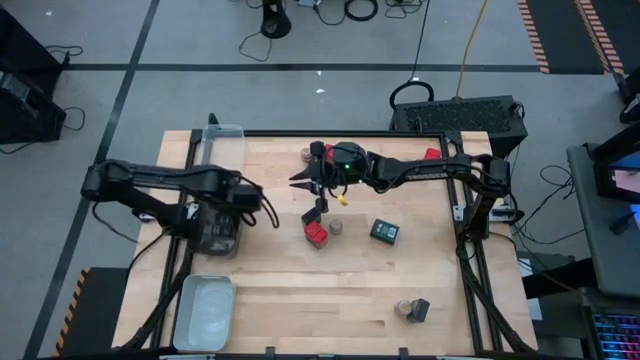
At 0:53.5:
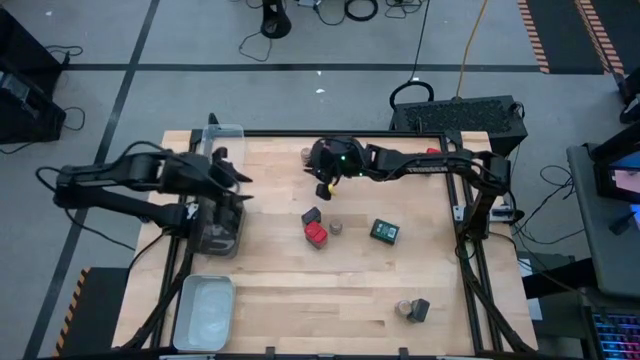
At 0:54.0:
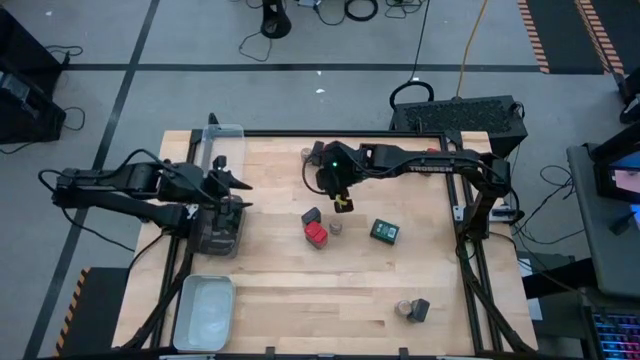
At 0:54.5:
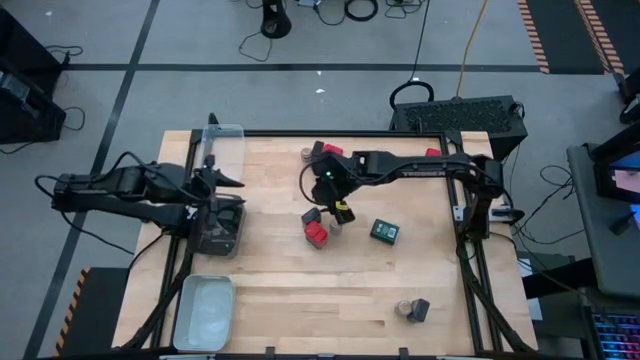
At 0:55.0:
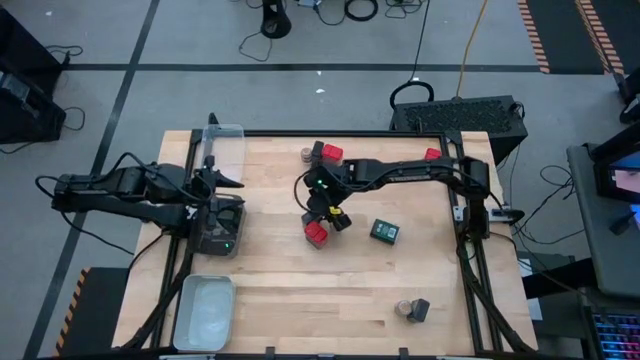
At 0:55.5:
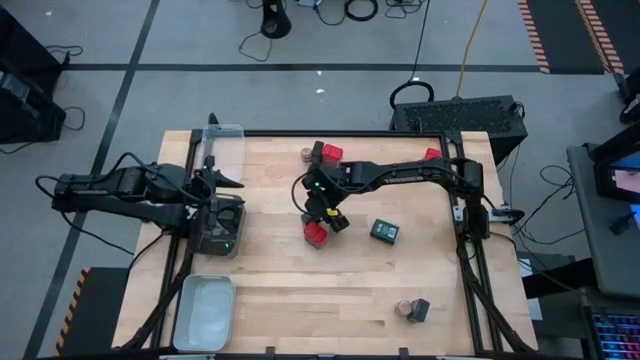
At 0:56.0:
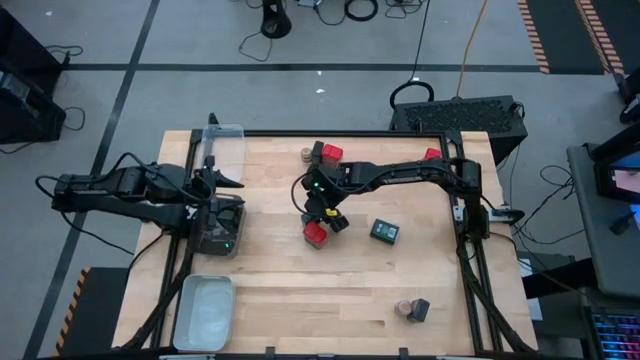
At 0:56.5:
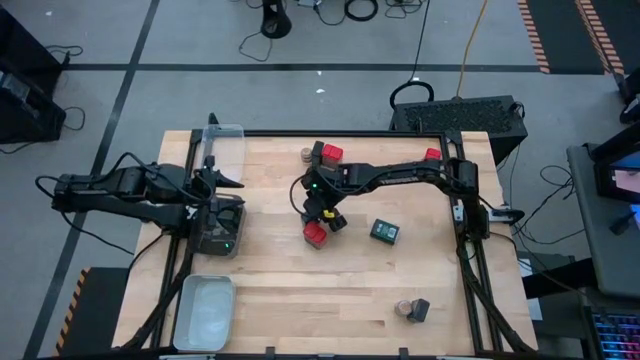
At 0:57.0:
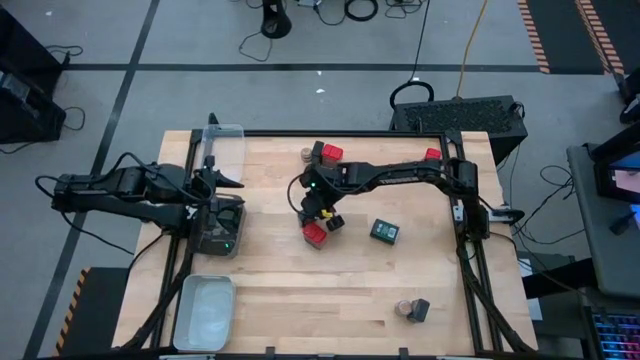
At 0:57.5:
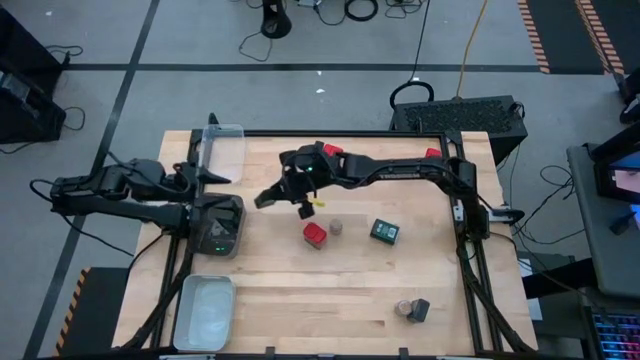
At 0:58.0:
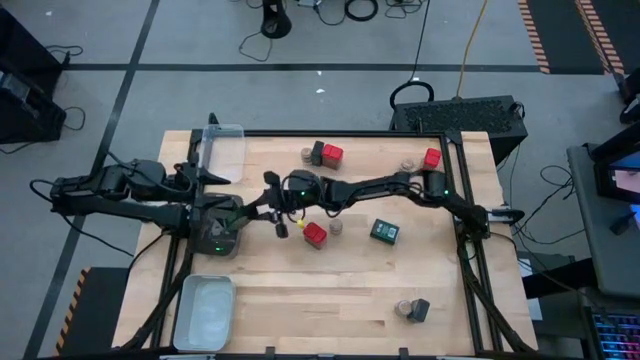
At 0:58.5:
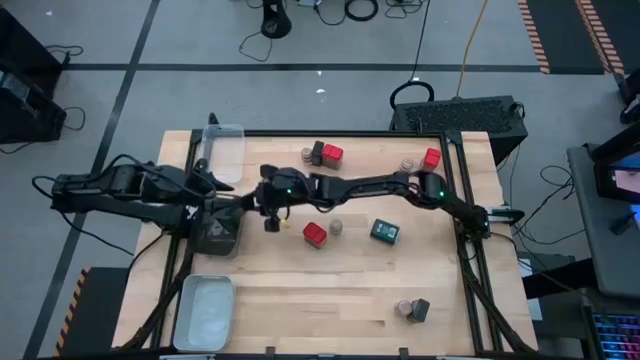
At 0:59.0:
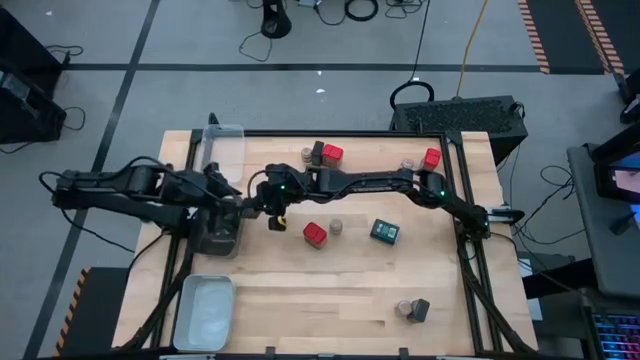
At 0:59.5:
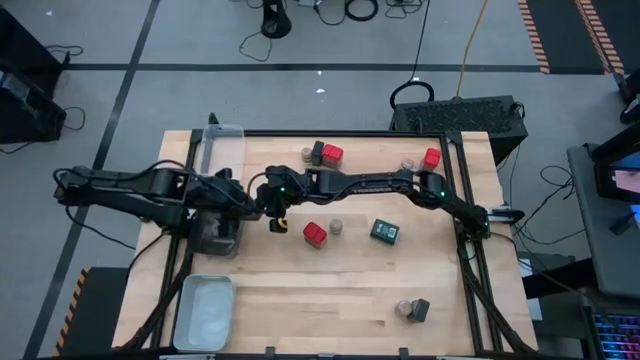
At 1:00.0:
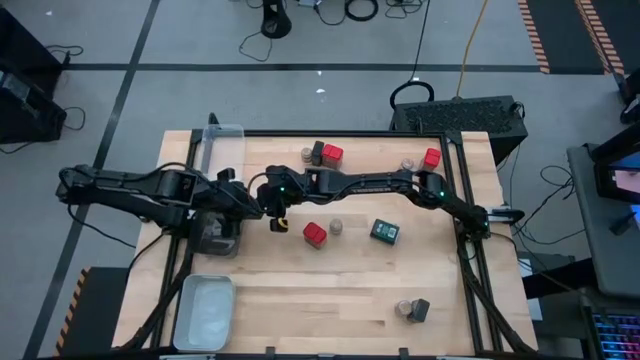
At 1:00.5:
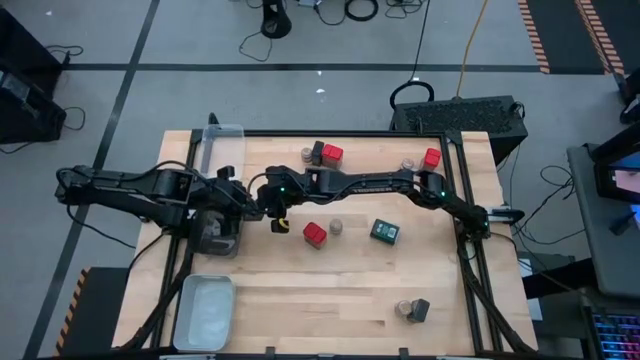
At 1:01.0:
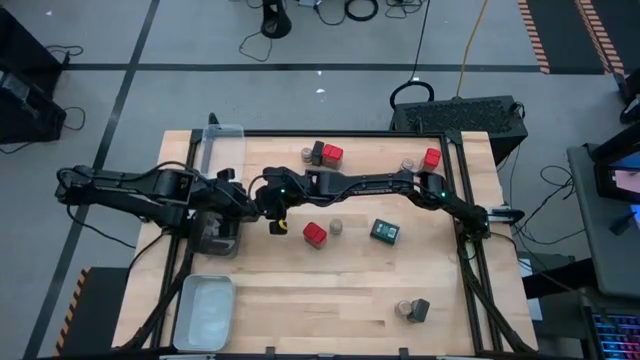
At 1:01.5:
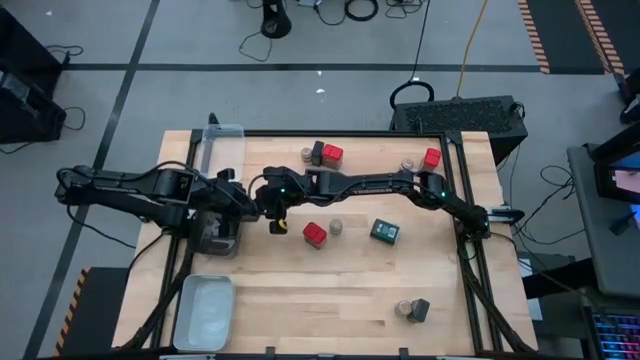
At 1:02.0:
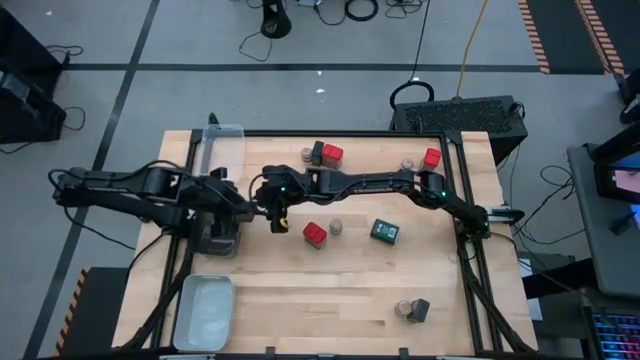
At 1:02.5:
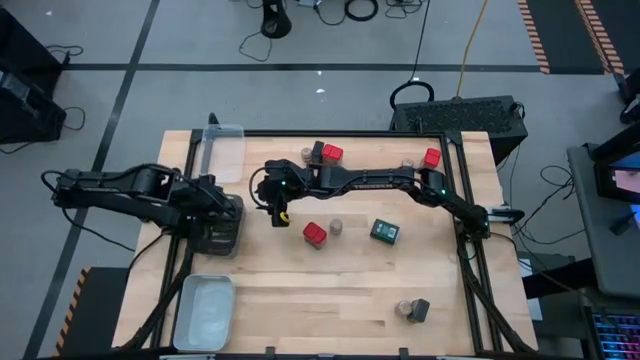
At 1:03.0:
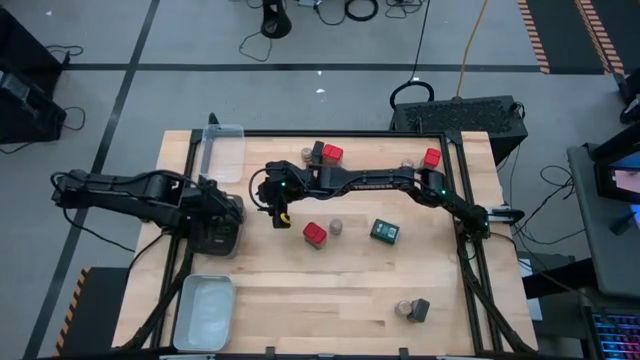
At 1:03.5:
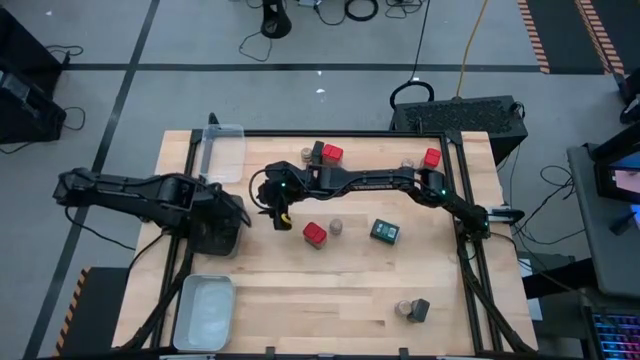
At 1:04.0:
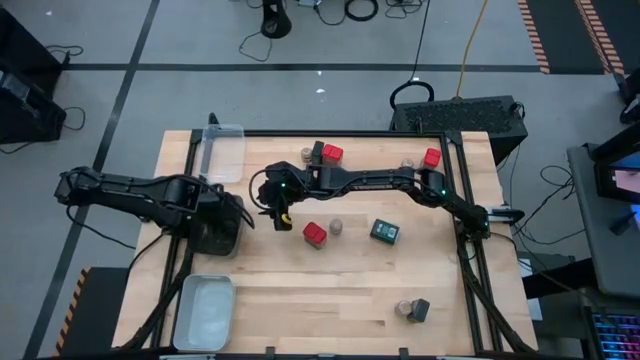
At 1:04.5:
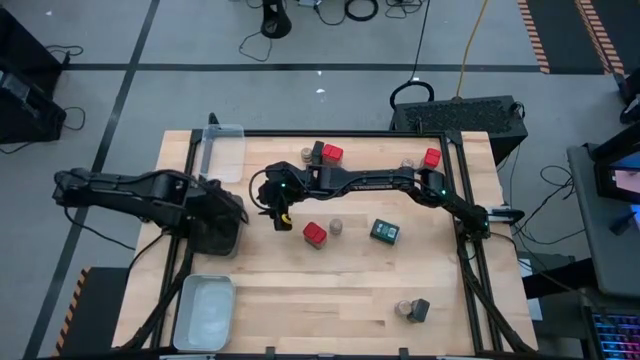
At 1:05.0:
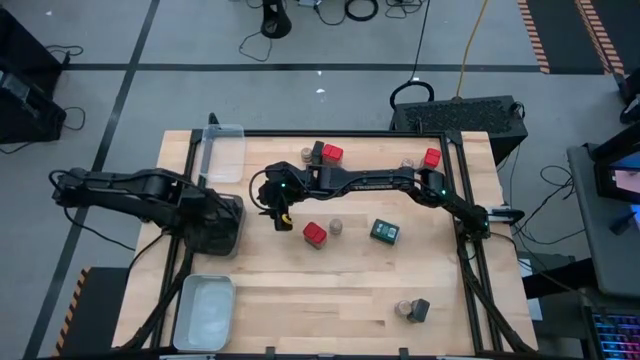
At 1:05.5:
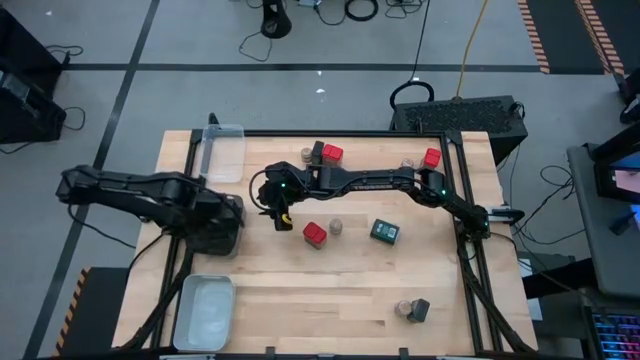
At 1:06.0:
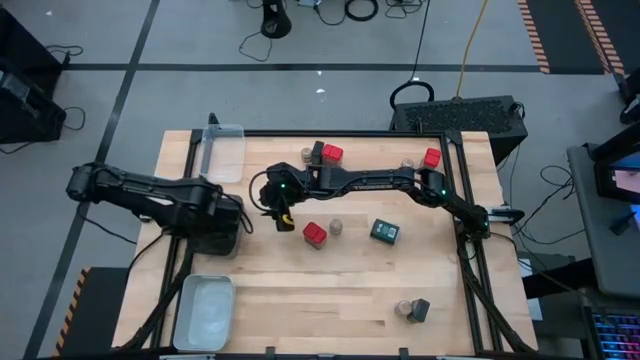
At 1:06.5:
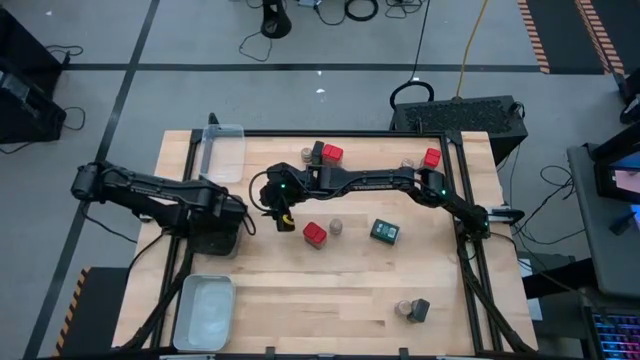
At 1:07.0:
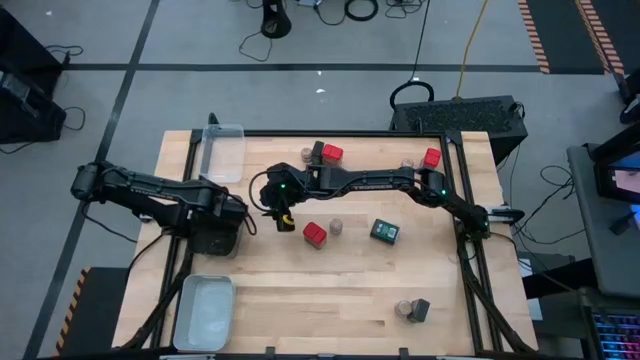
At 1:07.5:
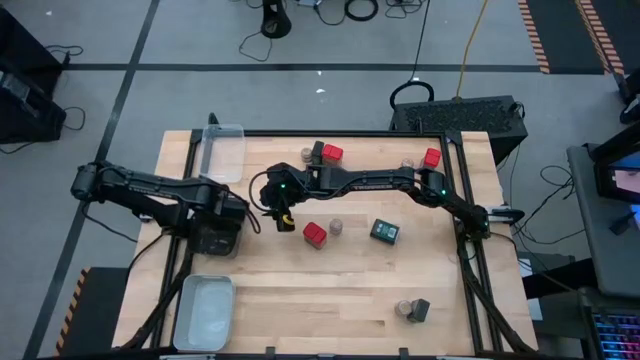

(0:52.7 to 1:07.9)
Task: Sort spices by type
Put the black seasoning can into the black bin

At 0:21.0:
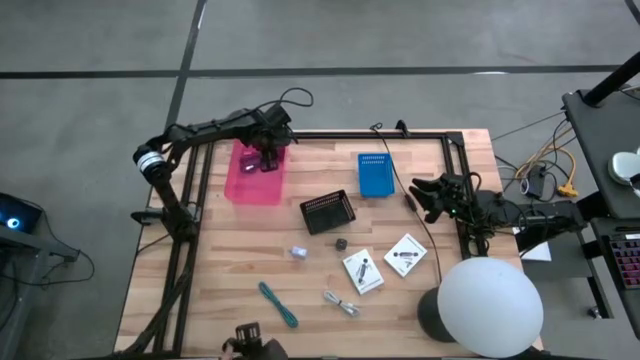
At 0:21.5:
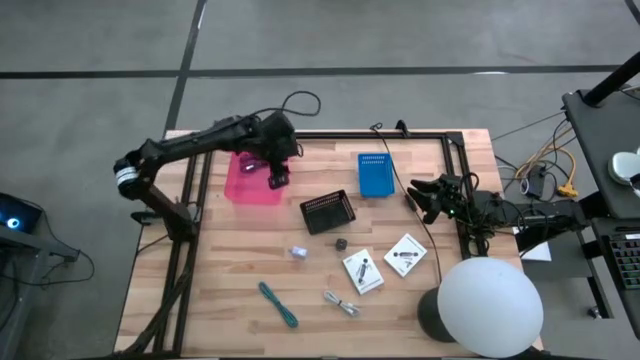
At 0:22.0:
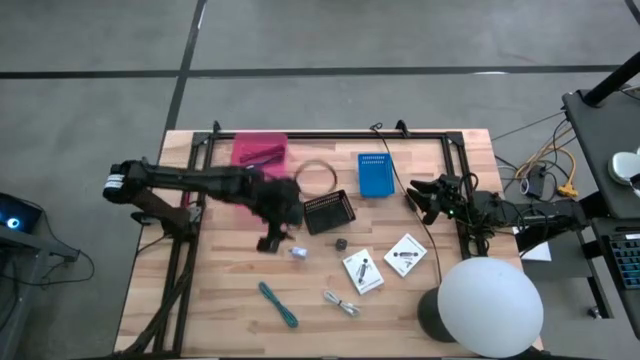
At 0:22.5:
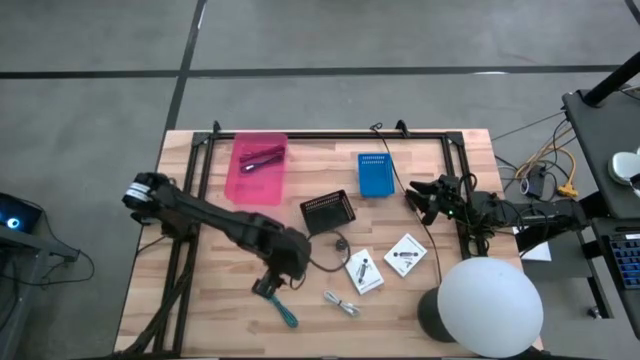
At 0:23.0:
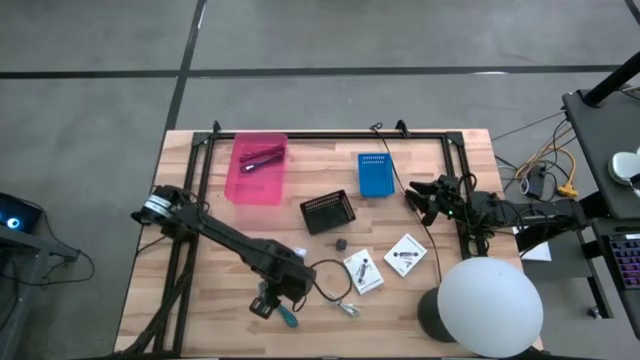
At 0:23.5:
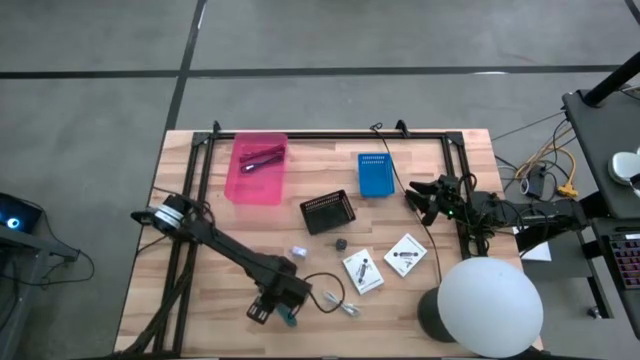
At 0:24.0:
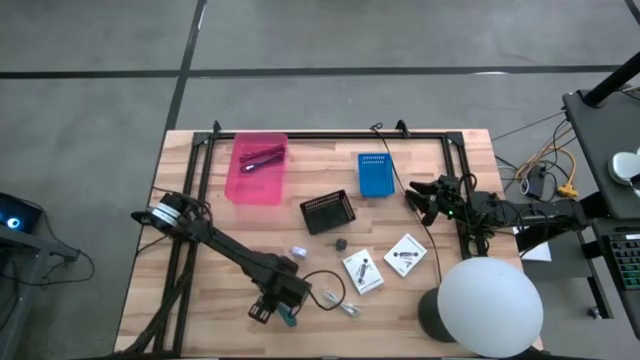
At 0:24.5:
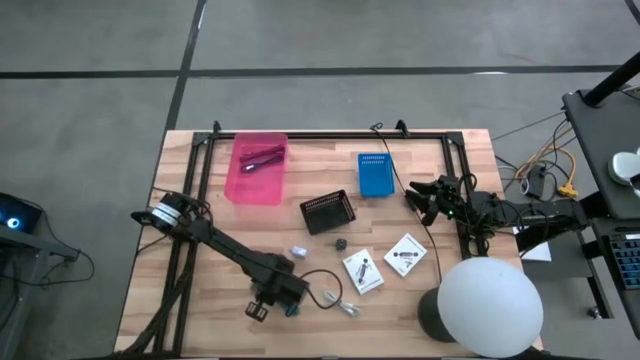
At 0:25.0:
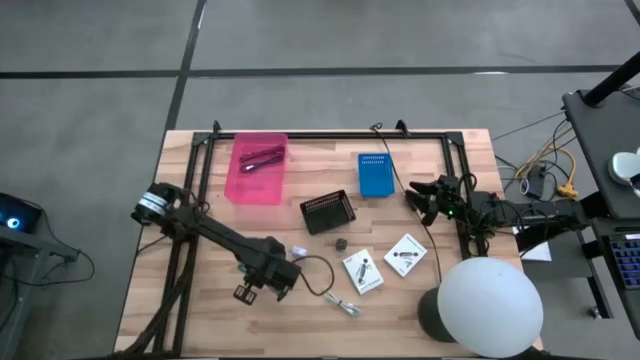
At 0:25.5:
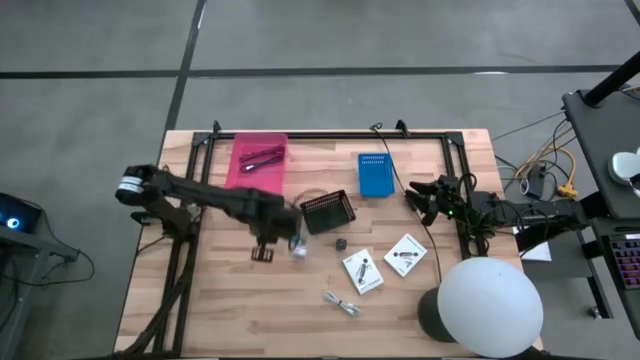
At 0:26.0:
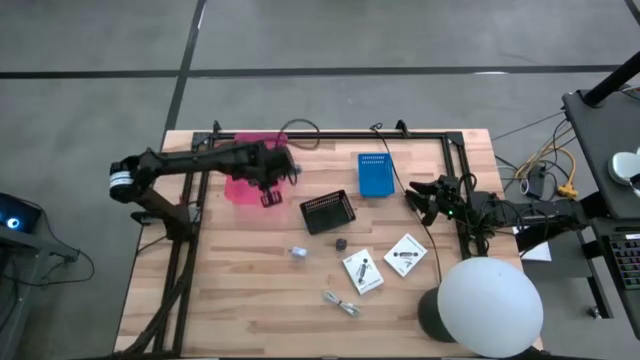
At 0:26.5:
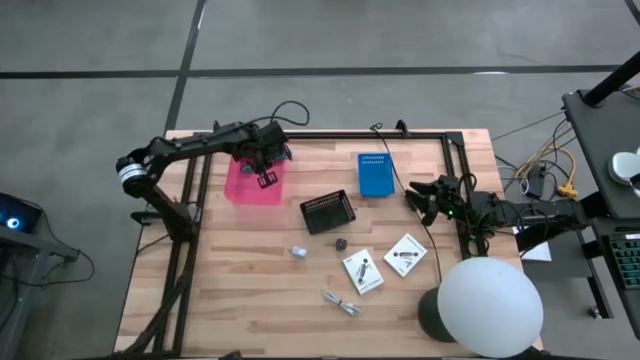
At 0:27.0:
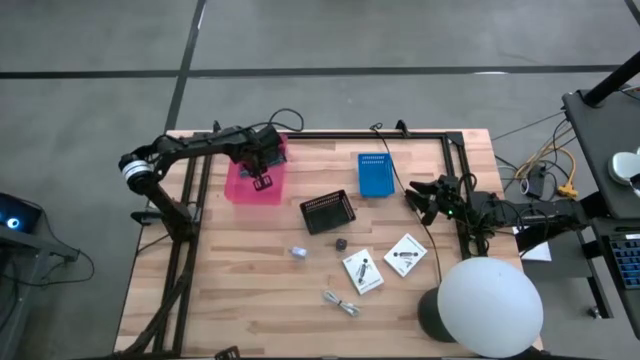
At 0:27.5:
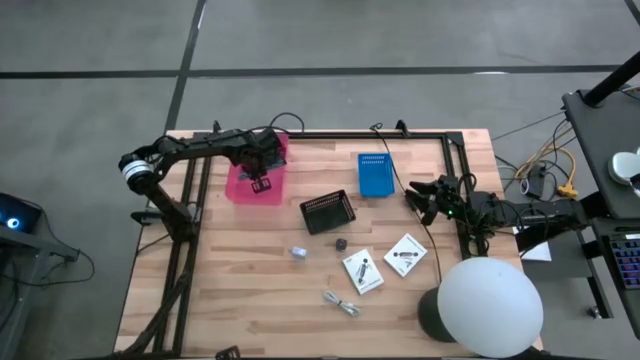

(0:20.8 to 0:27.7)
Task: Pick and place items into bin
Put the light blue charger cable into the pink bin
